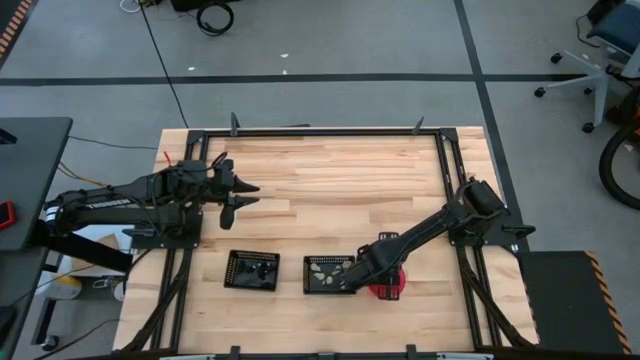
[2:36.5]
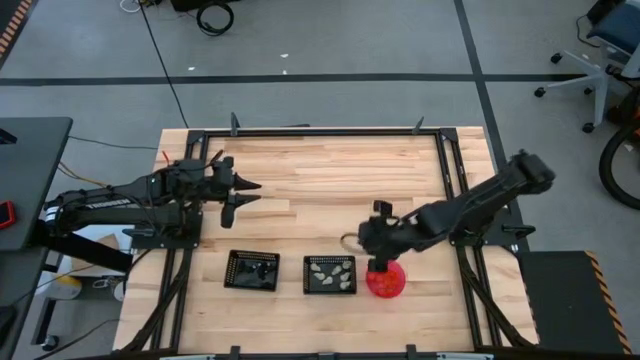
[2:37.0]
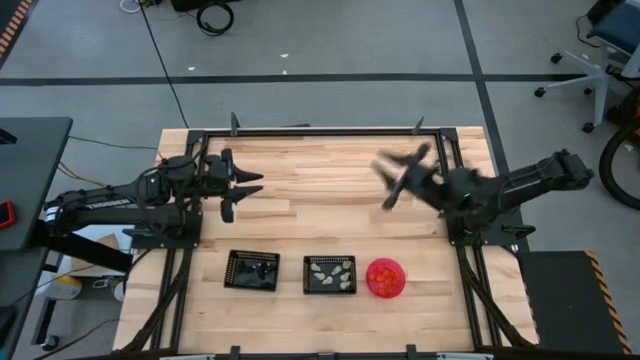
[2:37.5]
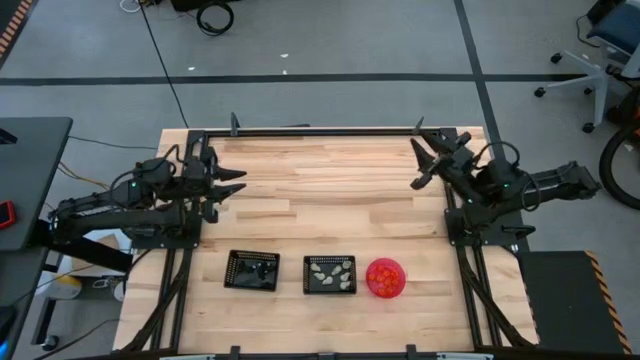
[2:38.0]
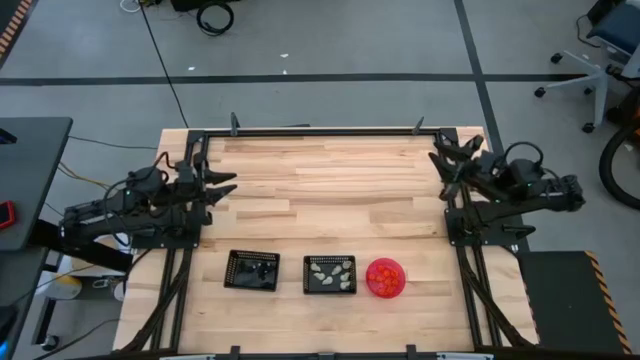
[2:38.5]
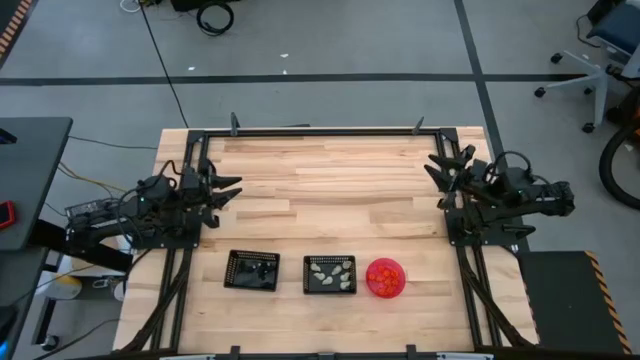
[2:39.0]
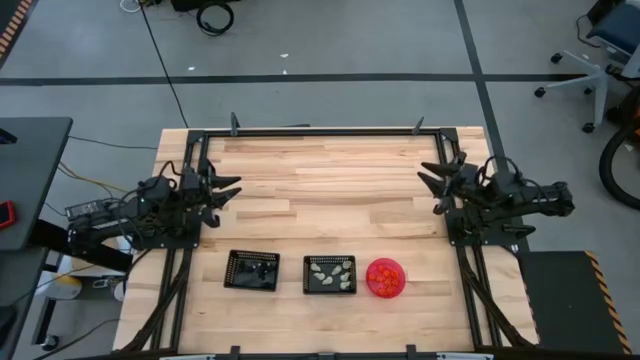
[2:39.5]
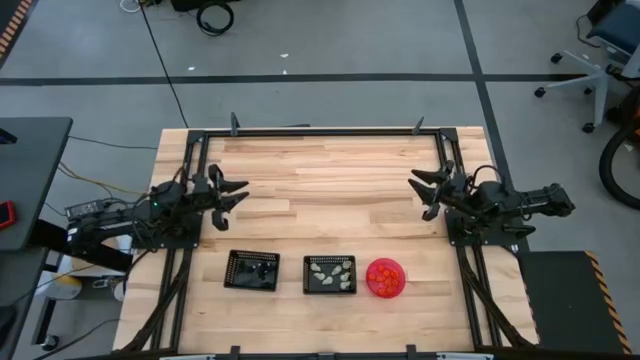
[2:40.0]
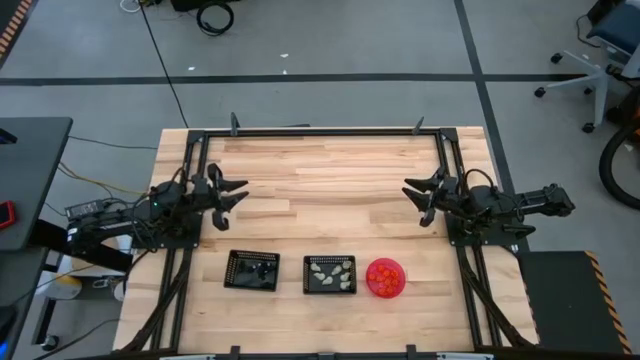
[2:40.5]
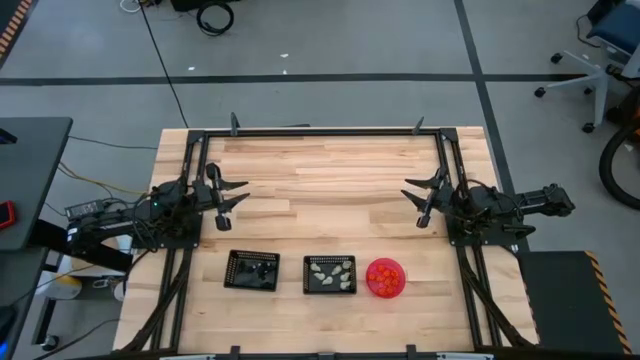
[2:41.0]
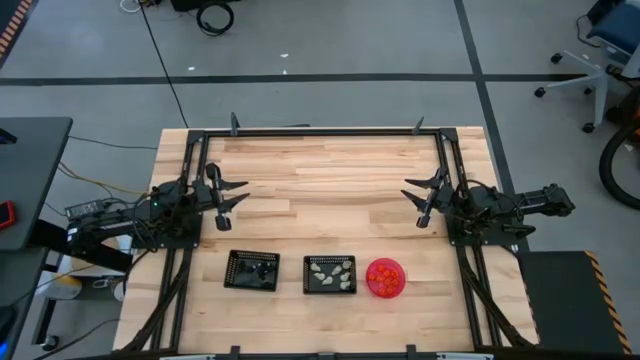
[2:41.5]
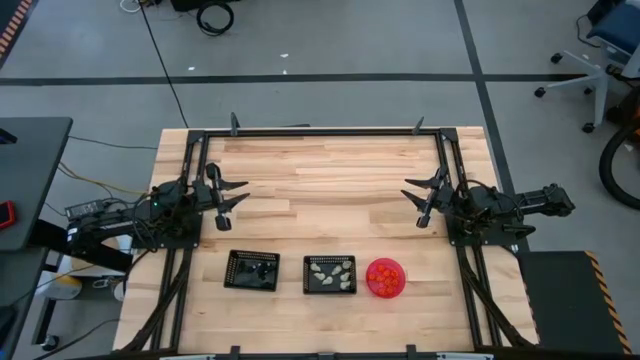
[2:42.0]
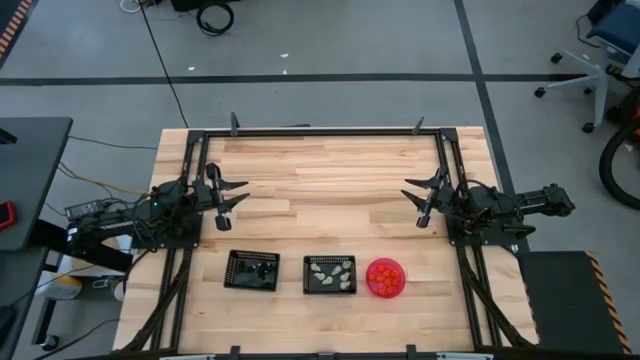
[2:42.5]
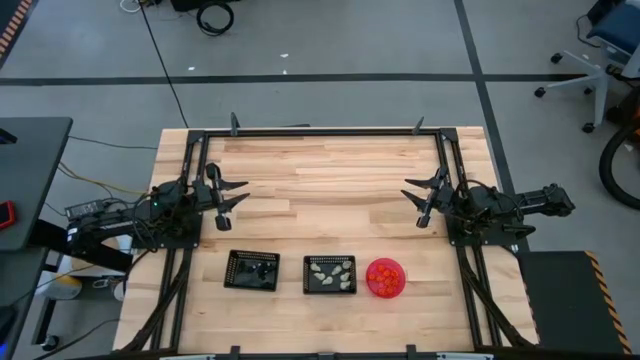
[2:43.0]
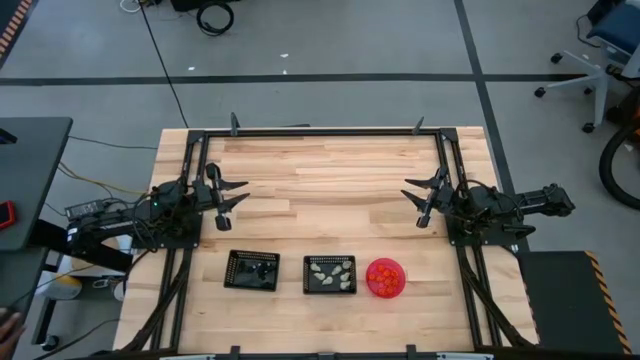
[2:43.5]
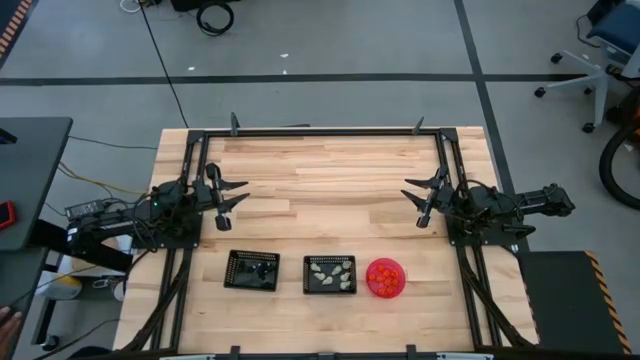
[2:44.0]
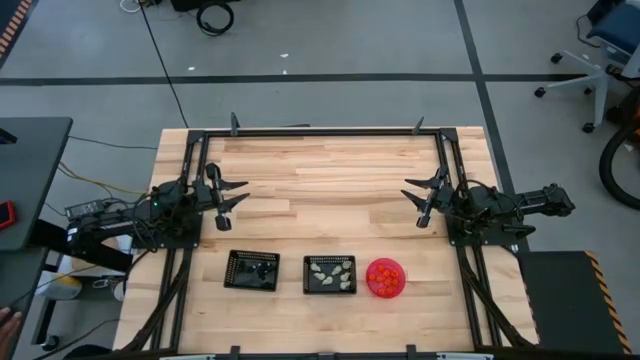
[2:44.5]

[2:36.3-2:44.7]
Task: Sort Halloween decoration
Return to Home Position

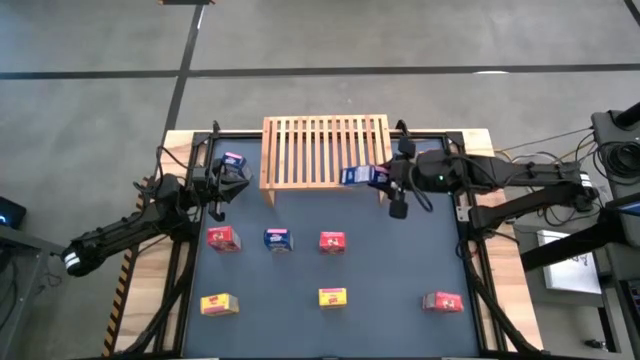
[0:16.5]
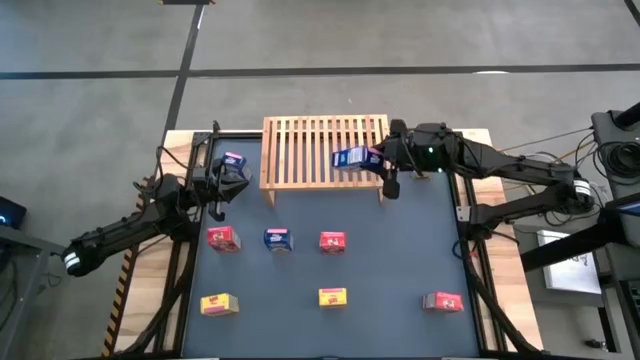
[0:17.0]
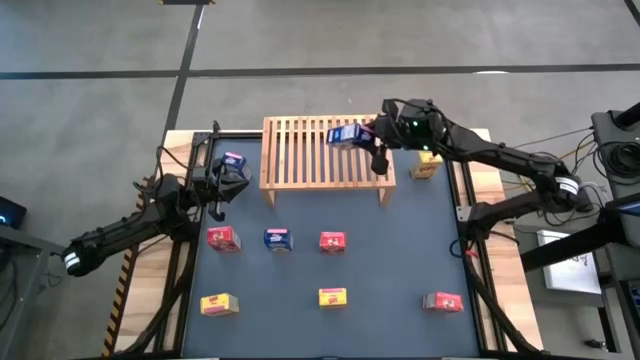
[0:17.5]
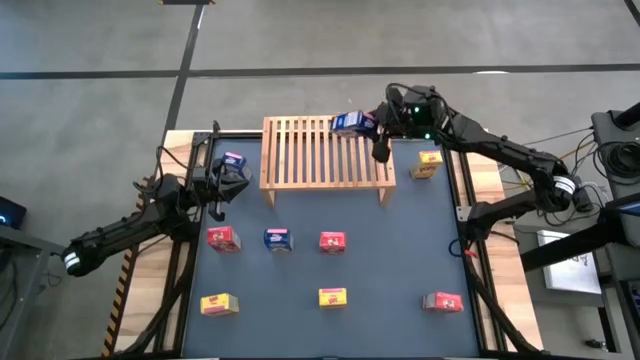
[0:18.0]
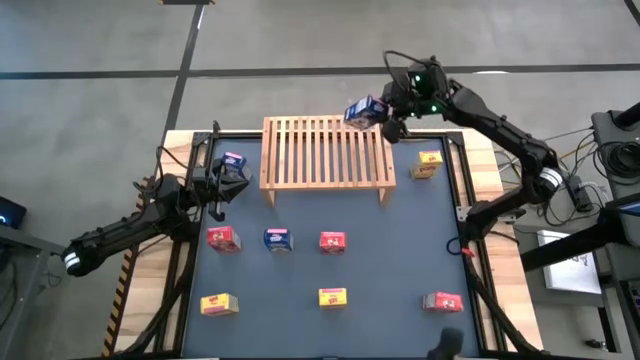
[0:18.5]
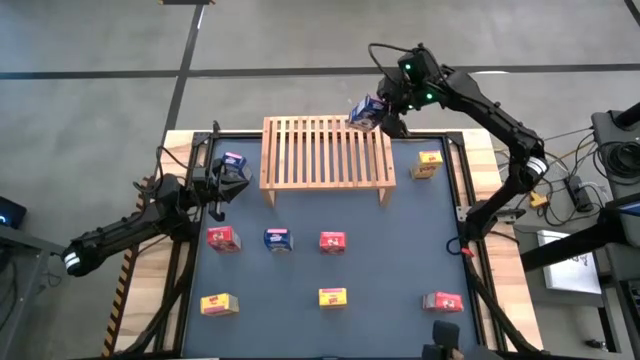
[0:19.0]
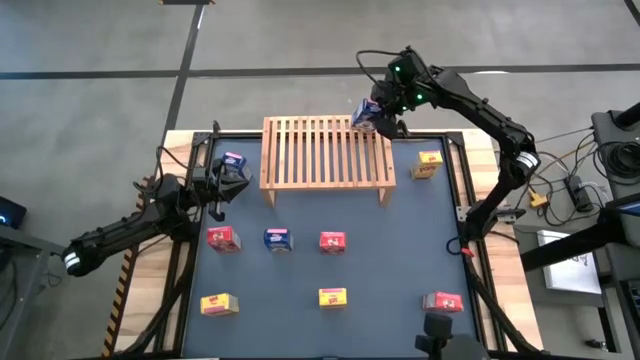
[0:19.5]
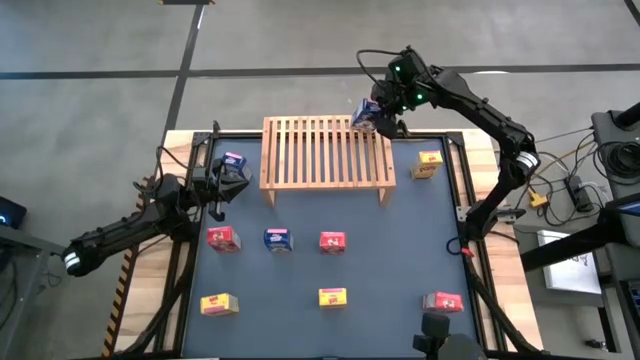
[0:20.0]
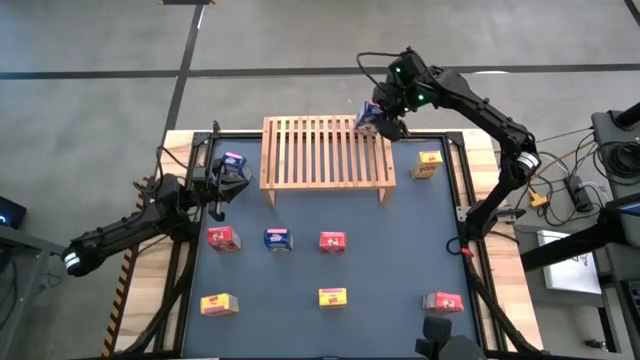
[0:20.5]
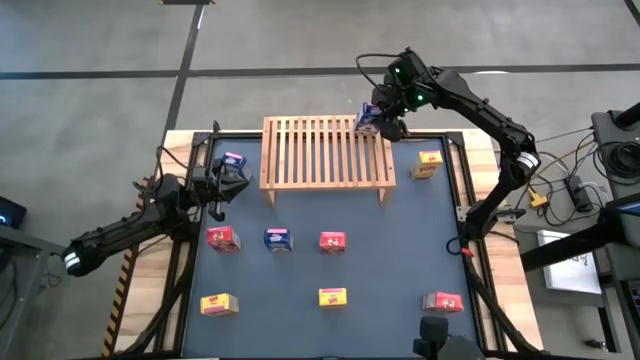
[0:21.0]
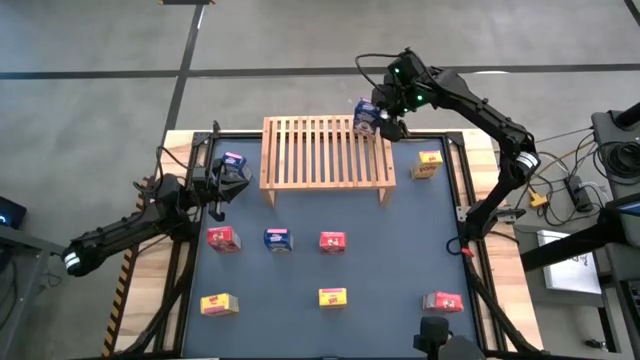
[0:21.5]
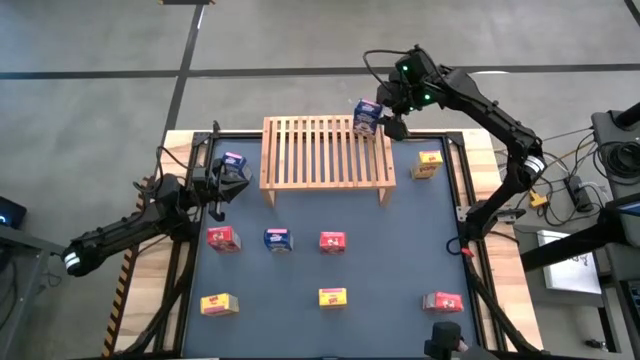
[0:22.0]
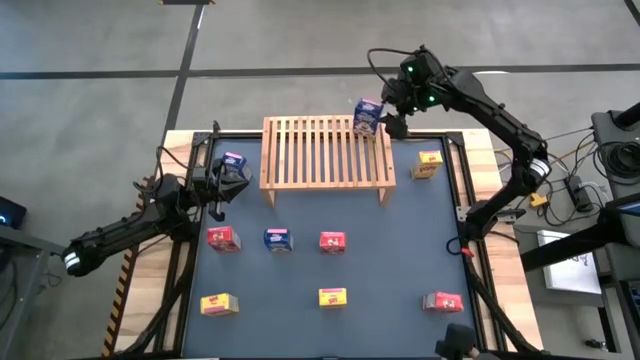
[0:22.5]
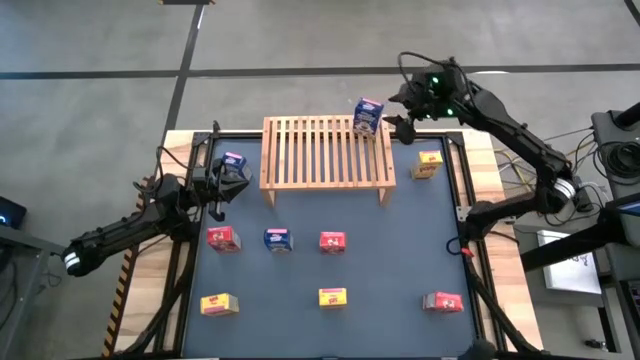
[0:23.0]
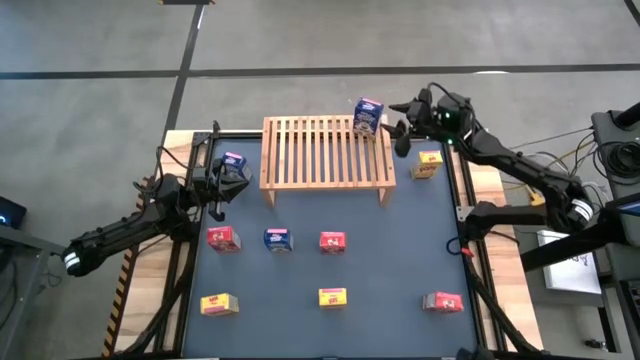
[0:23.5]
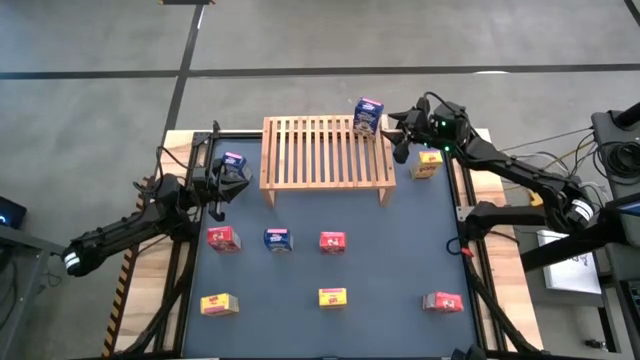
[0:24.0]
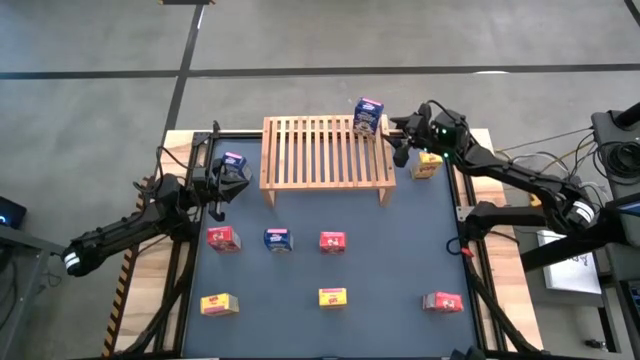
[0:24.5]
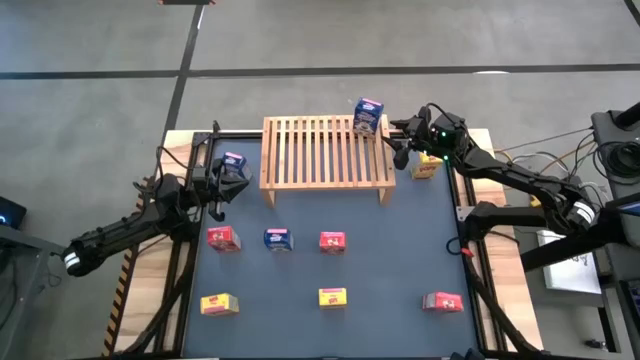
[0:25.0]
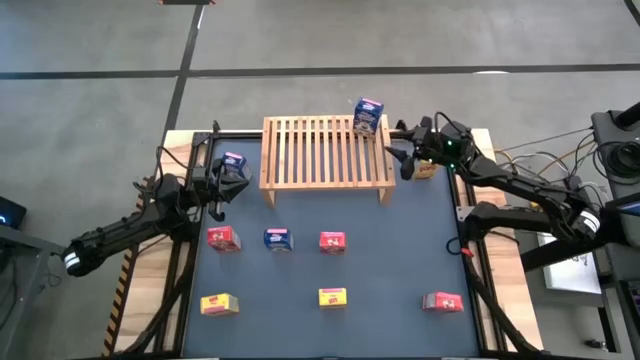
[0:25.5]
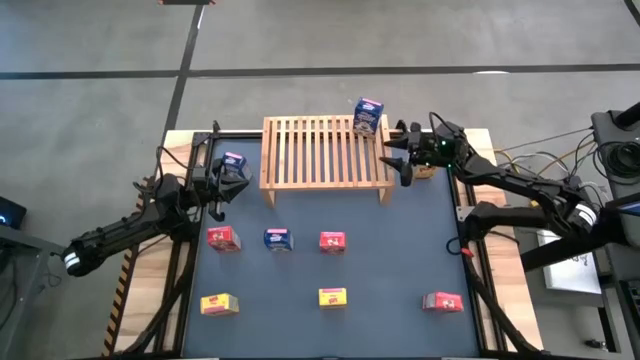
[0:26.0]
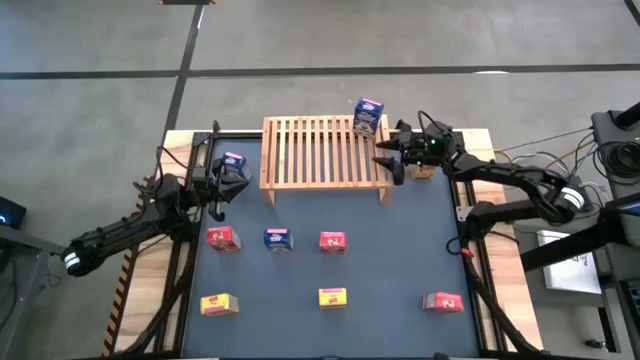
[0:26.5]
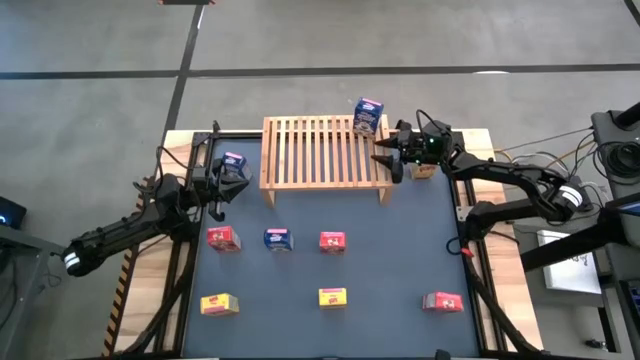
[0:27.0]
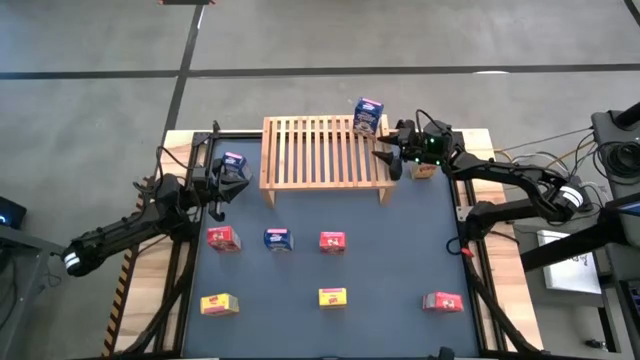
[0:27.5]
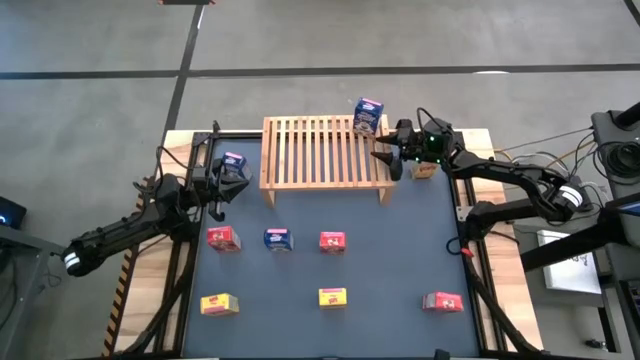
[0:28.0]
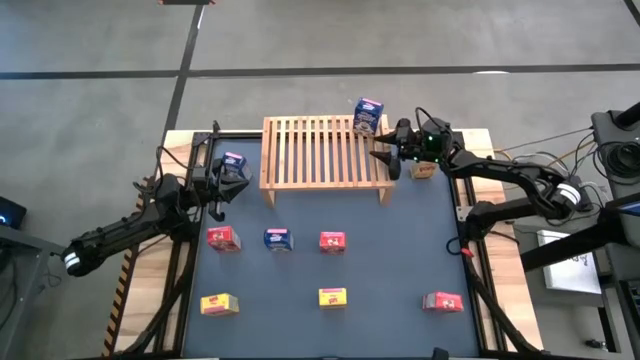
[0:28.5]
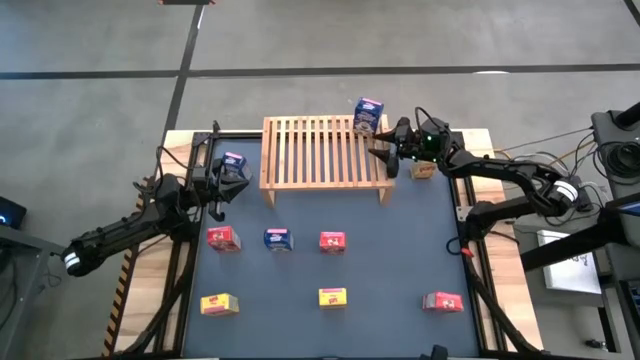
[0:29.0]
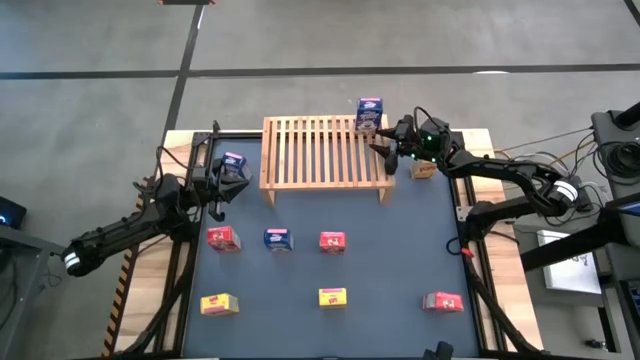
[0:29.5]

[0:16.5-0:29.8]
Task: Stack cereal on shelf
Put the bottom right blue cereal box on the shelf
